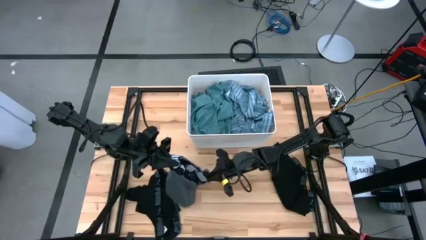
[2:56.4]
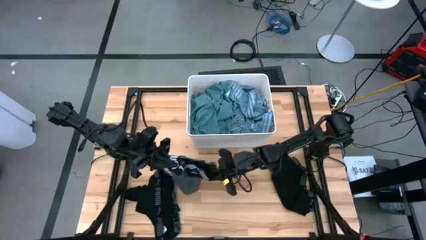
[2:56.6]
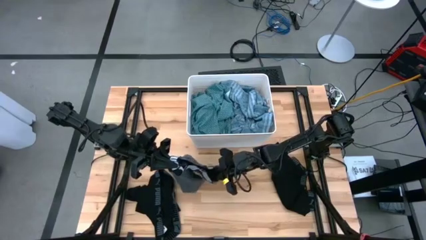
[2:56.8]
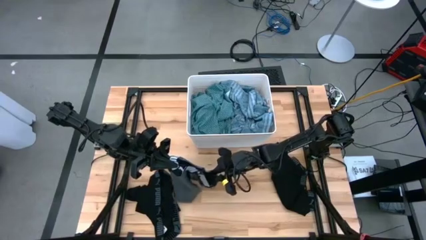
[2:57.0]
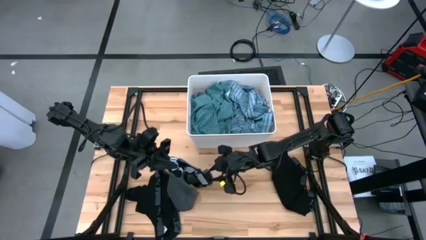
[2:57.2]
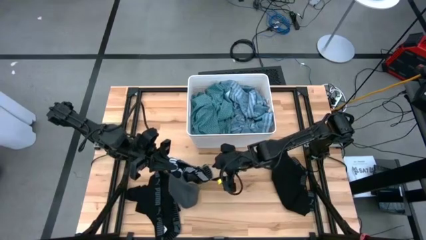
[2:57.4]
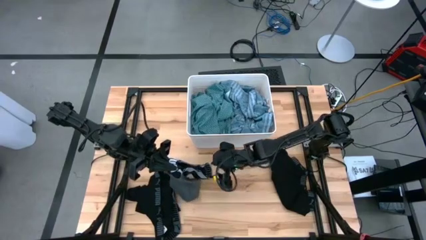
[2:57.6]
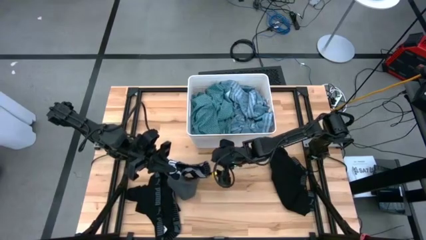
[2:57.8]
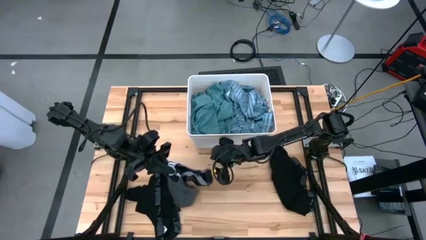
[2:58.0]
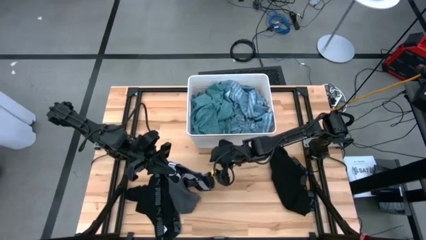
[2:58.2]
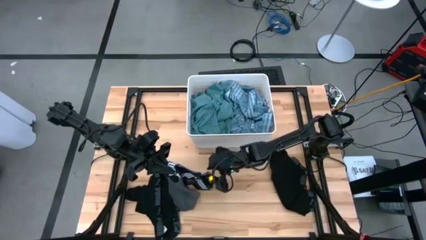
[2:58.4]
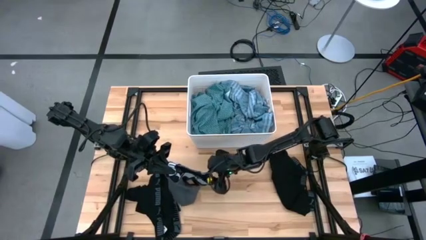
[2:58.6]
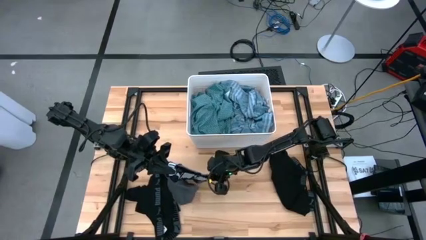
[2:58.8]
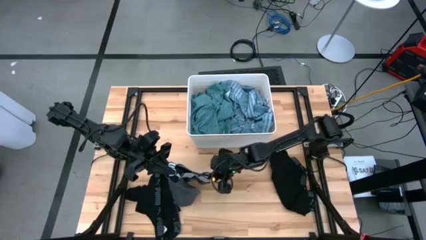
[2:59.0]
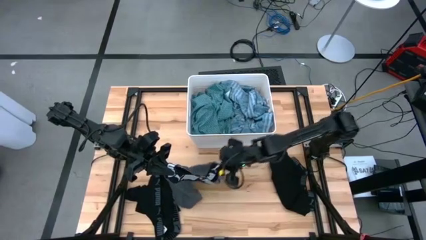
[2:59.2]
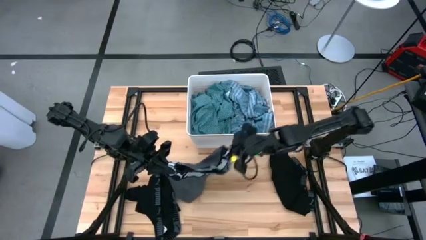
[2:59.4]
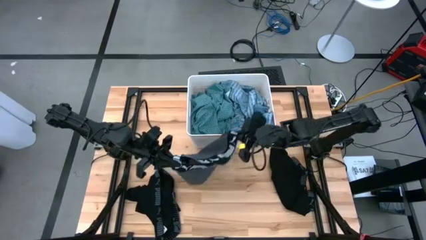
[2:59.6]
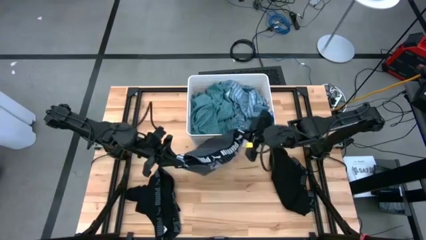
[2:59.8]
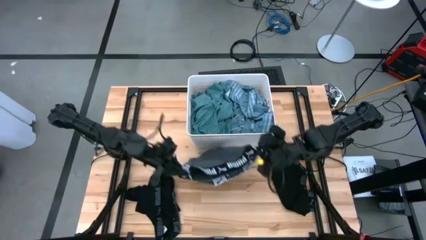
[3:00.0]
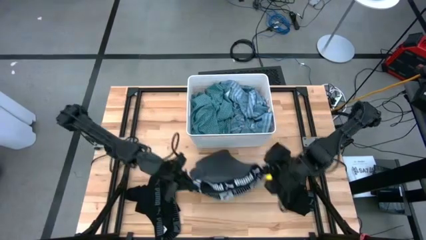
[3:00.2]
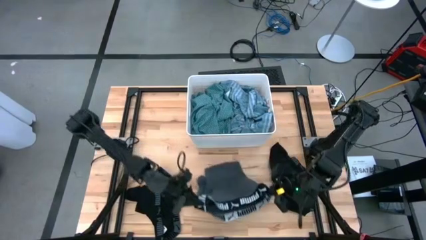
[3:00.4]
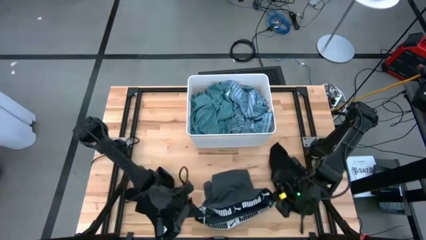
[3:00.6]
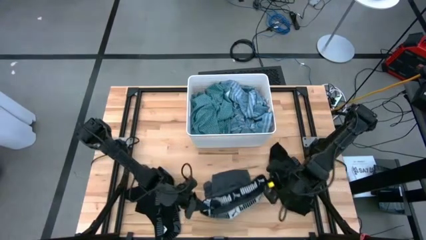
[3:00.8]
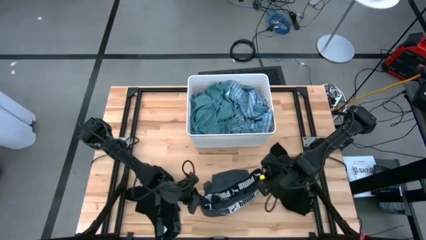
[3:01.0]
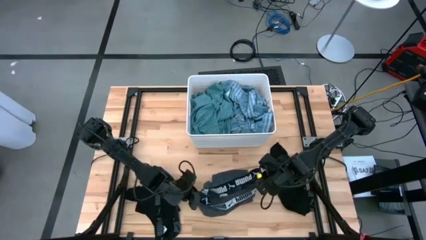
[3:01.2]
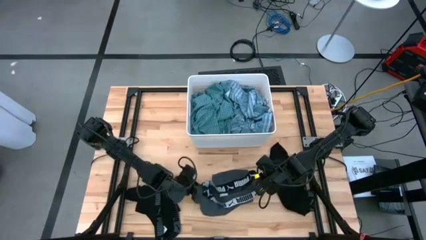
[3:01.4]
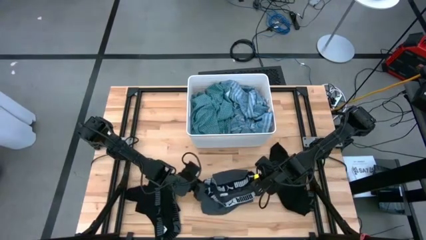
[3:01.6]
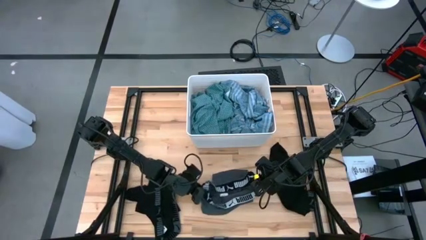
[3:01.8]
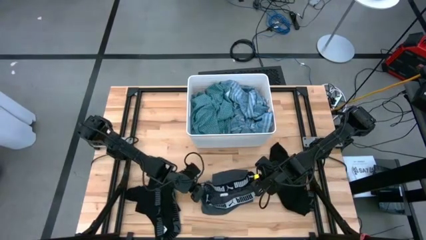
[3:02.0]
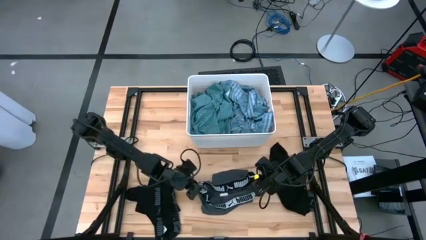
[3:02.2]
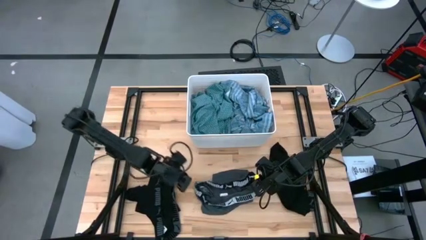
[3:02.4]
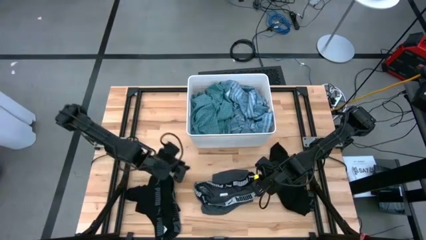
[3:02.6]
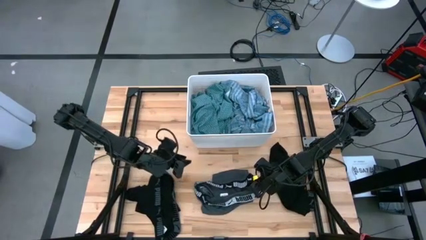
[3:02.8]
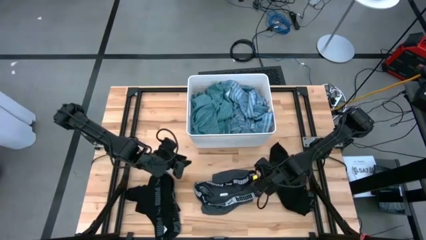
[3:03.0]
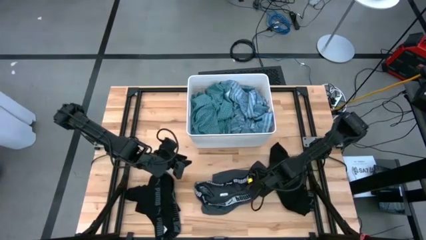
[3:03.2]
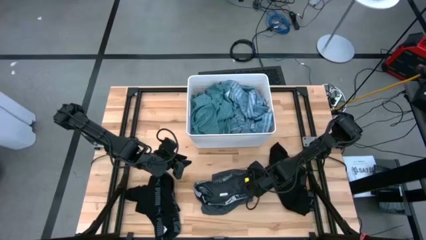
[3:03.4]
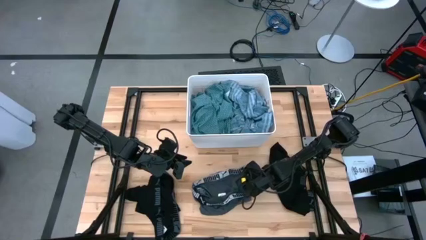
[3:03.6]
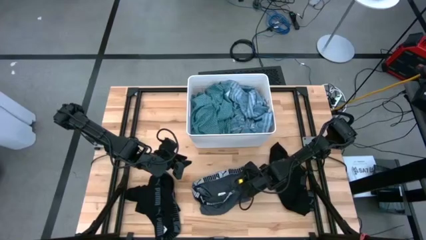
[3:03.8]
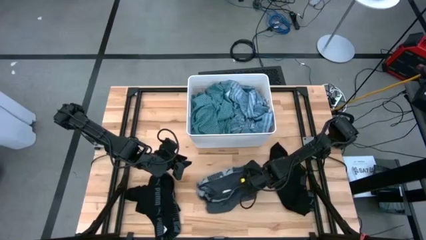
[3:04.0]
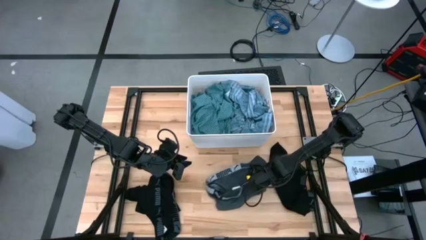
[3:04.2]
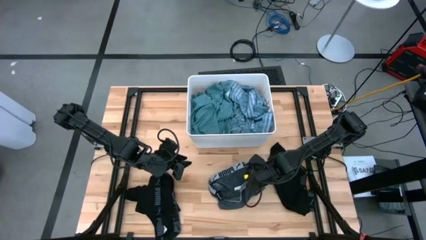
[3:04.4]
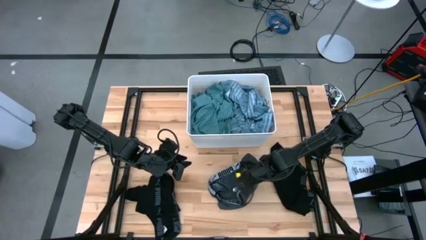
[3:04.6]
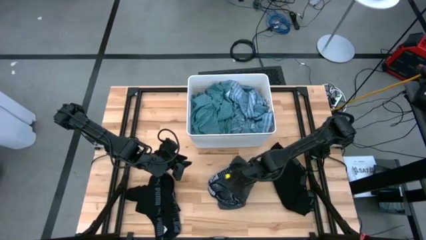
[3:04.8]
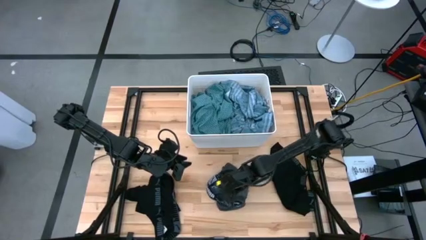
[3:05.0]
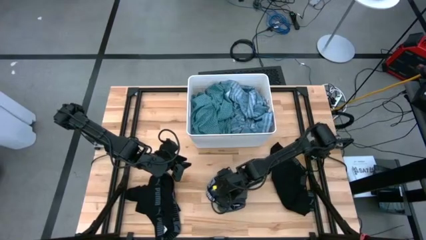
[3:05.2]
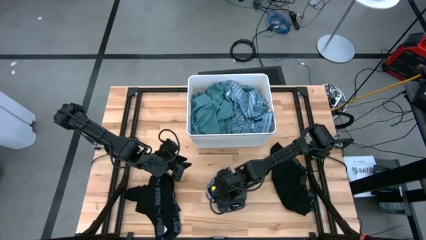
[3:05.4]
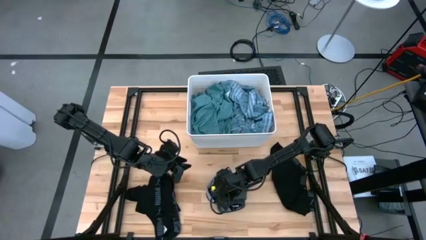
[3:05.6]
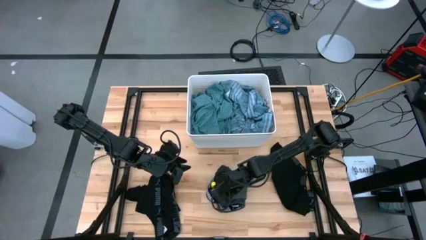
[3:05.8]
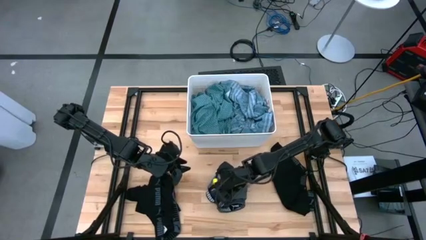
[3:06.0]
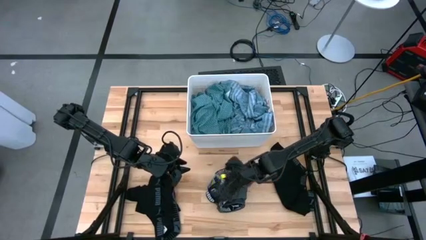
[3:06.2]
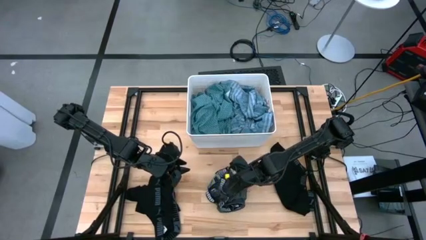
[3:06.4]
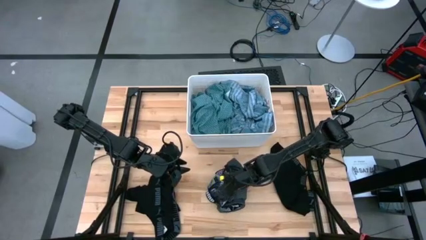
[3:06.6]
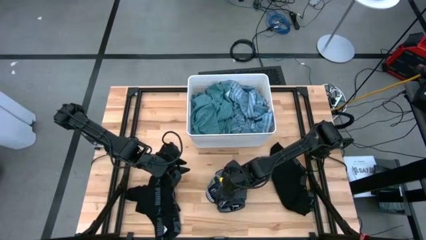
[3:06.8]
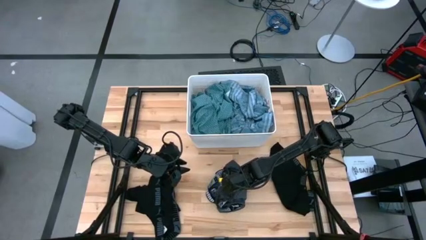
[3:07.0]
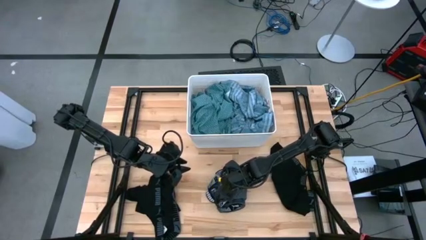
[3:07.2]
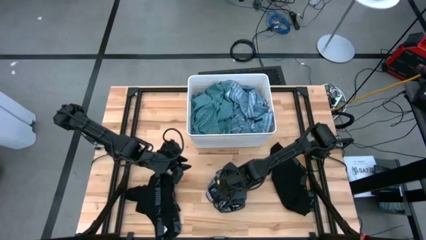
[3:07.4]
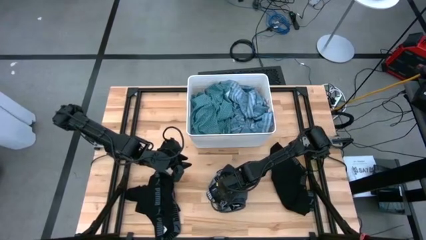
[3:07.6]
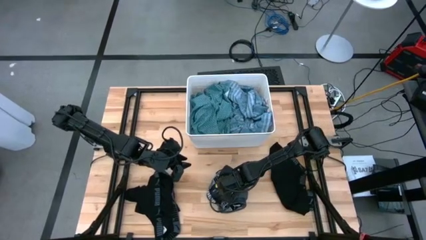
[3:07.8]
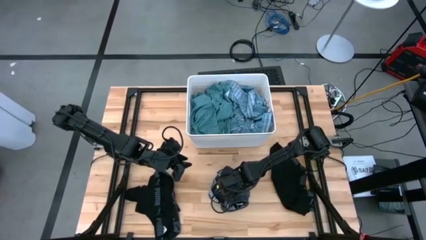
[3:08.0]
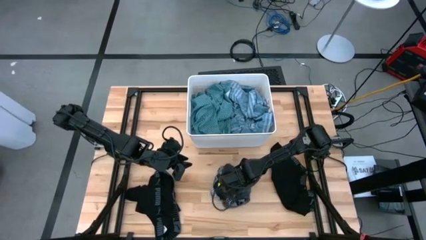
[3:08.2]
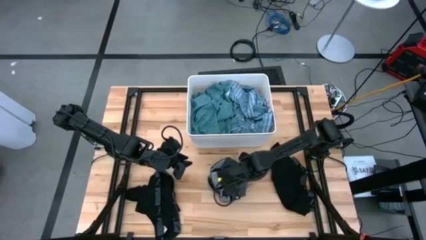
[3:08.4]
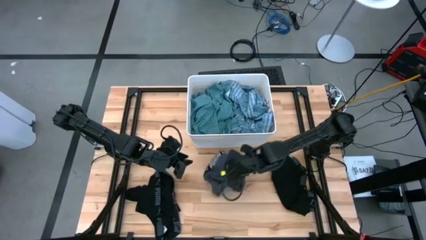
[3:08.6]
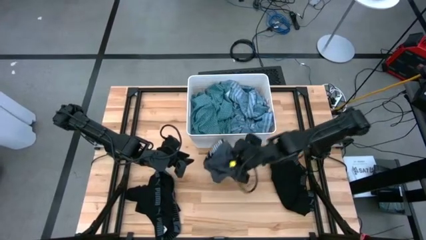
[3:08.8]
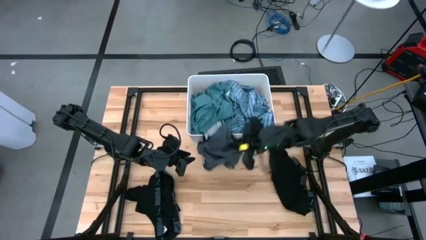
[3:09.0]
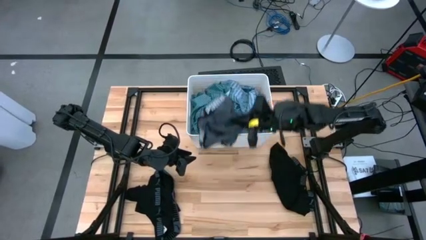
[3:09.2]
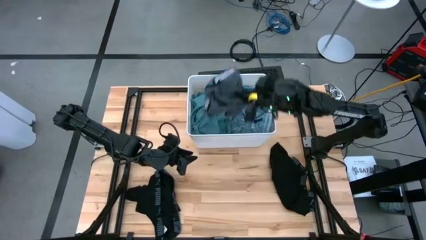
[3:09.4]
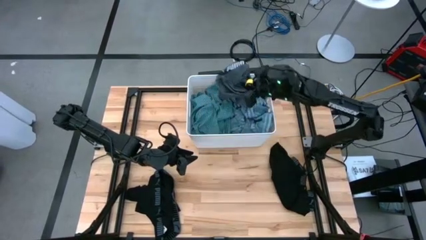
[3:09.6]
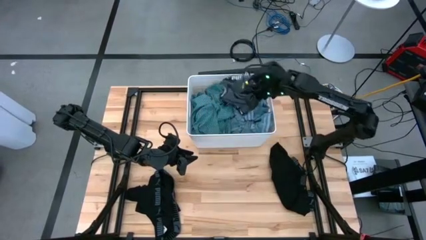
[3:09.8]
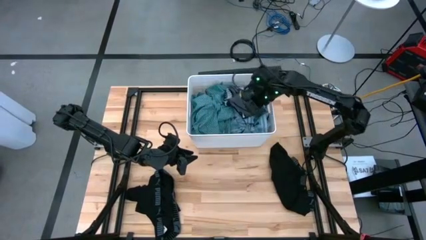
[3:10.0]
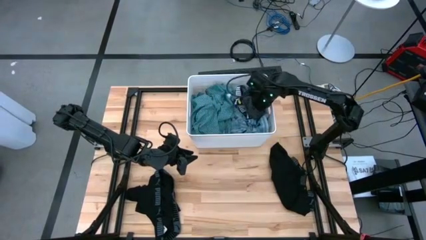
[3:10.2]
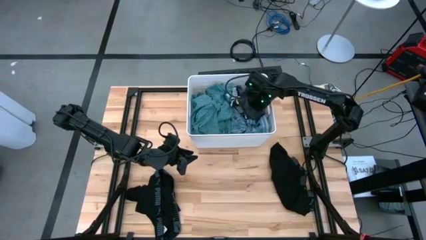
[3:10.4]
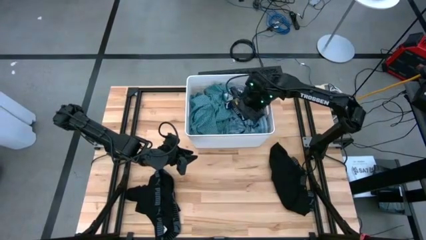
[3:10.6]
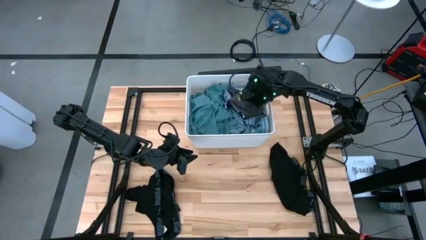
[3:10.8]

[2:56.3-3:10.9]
Task: Sort clothes
Put the gray underwear into the white laundry organizer

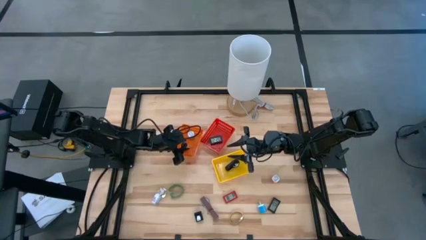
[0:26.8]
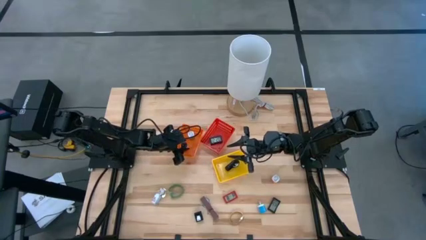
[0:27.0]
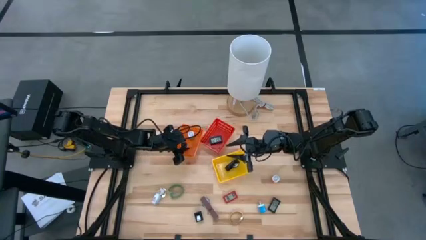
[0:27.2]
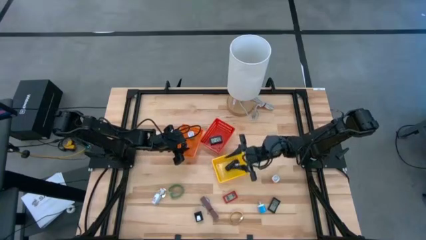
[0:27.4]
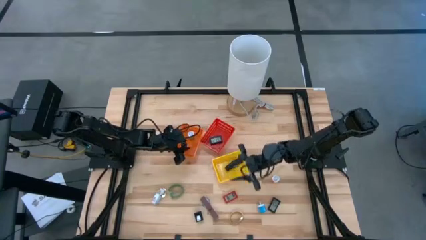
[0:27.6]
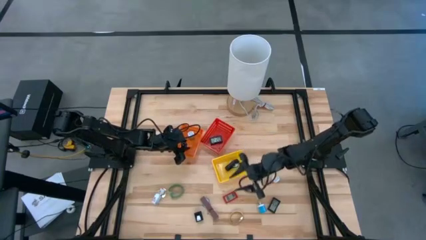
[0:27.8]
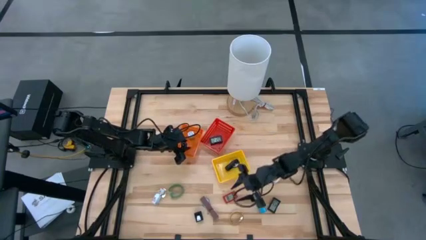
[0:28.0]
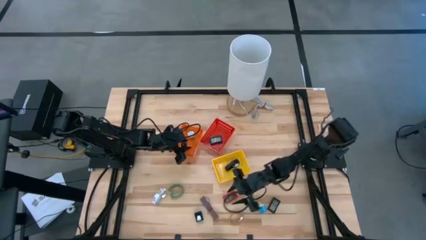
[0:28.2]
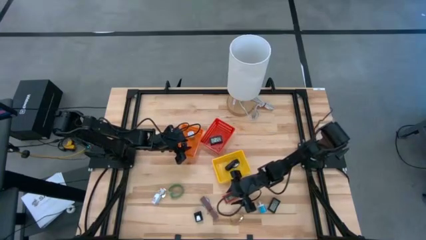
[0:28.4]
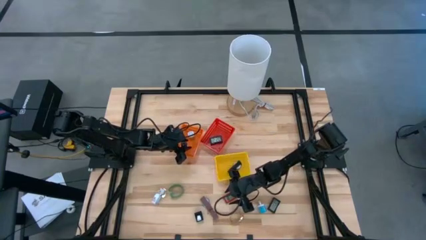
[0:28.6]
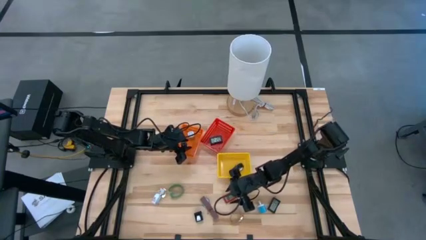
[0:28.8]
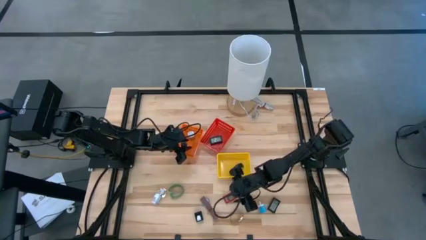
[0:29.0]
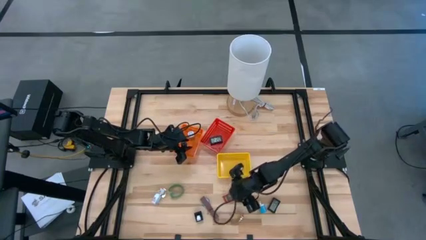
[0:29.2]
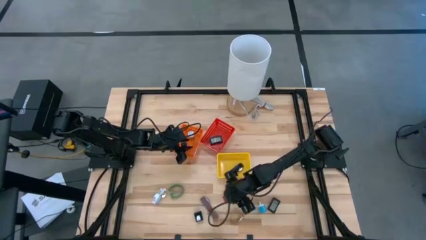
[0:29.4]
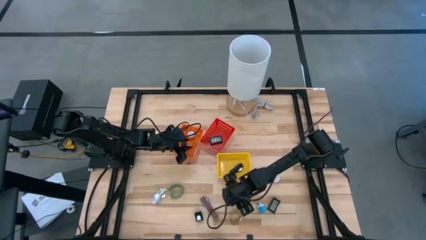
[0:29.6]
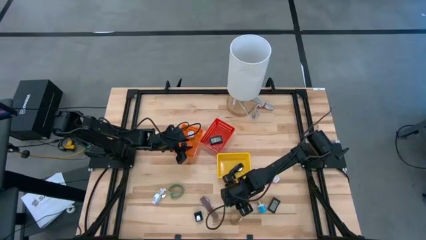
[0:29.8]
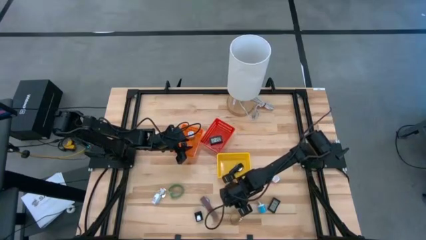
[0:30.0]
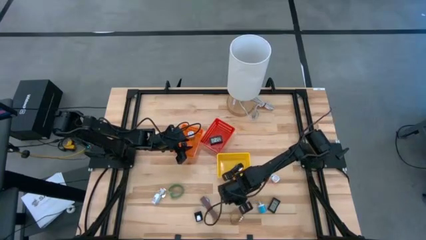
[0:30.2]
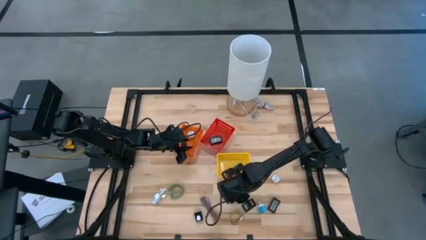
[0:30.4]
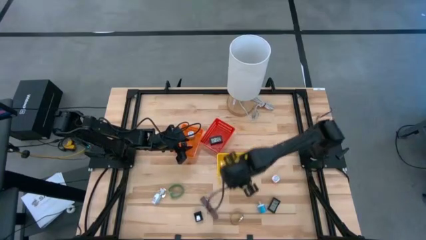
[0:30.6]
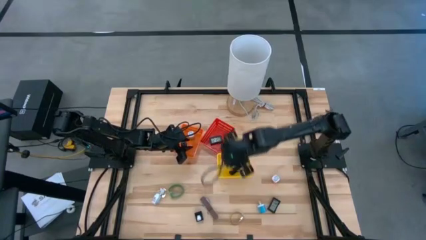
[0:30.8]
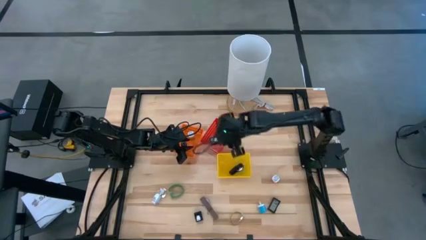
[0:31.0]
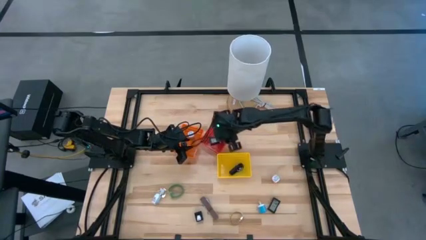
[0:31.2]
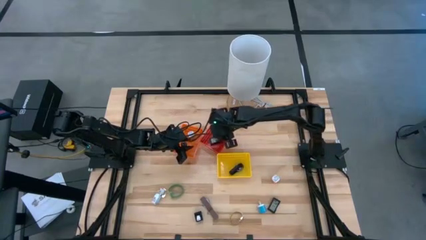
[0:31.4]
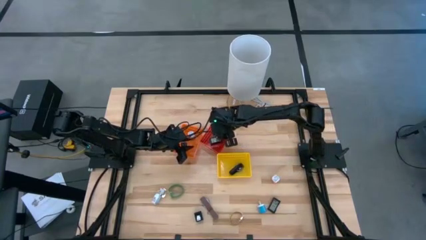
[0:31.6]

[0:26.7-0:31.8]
Task: Pick & Place Office items
Put the red digital clock into the red bin
